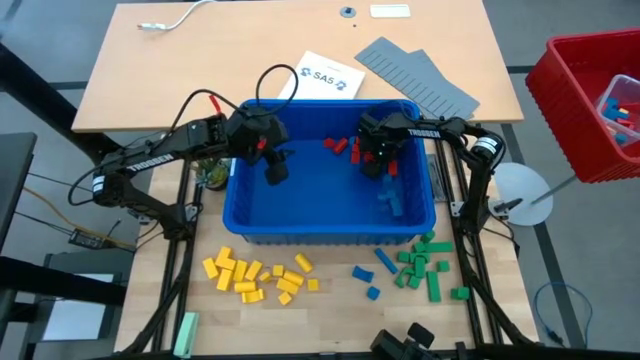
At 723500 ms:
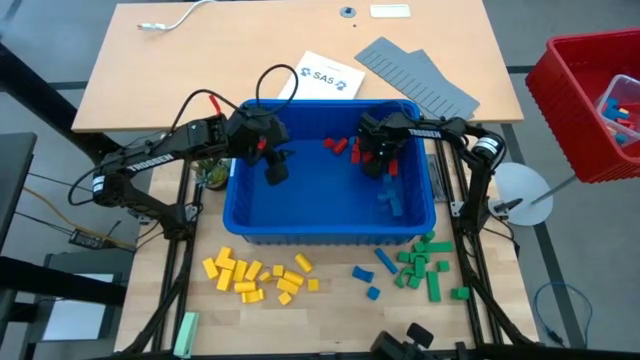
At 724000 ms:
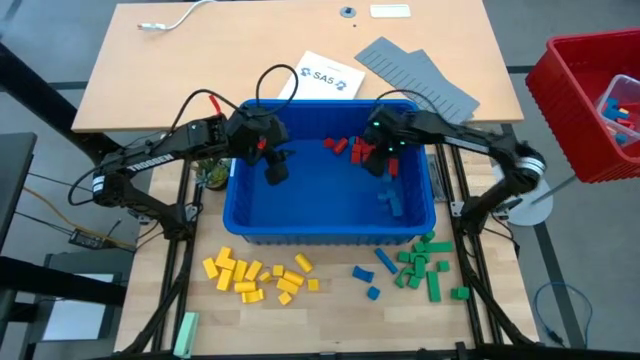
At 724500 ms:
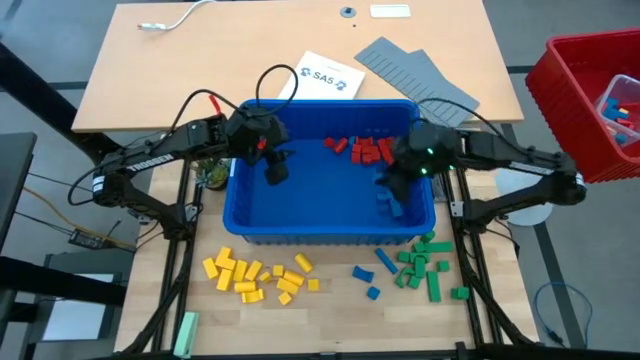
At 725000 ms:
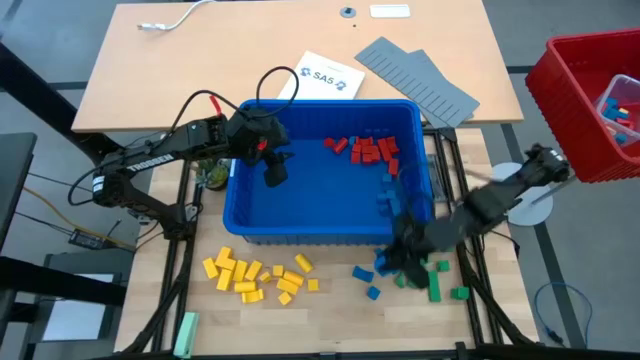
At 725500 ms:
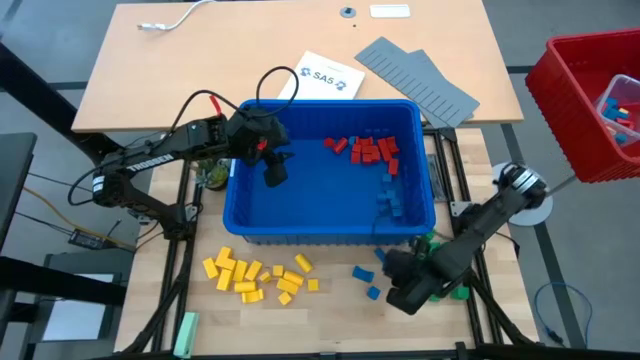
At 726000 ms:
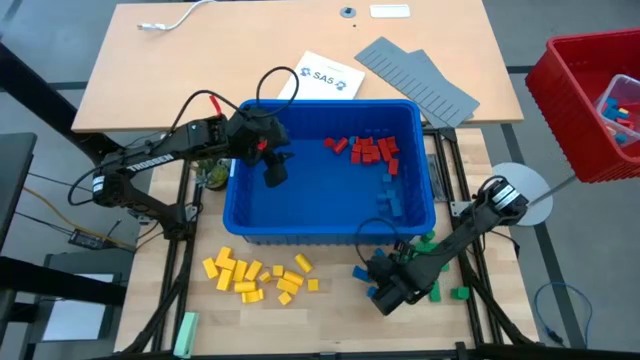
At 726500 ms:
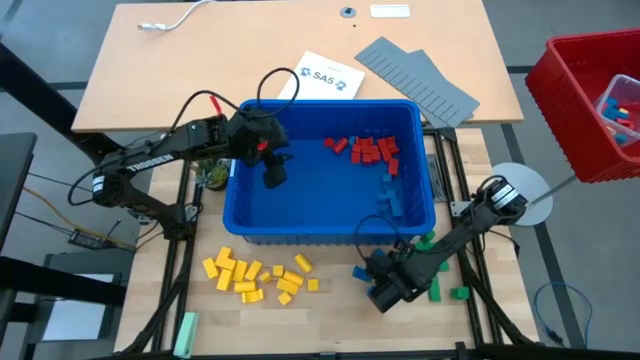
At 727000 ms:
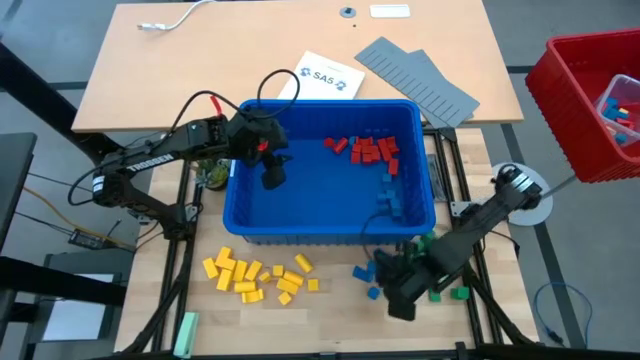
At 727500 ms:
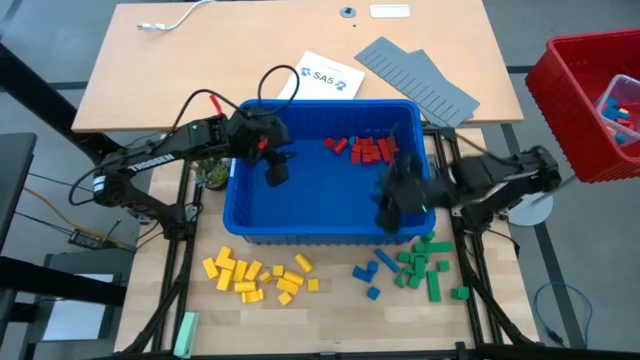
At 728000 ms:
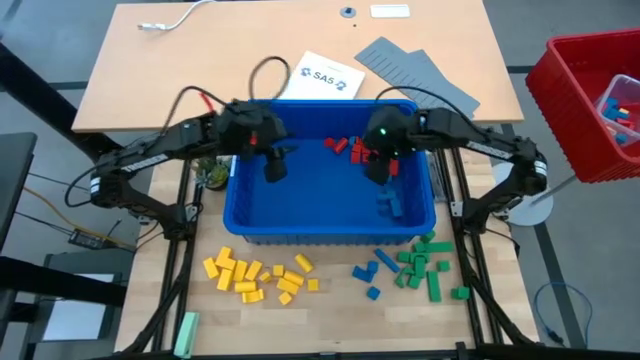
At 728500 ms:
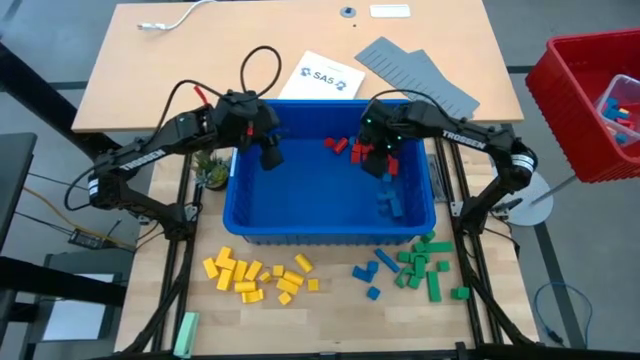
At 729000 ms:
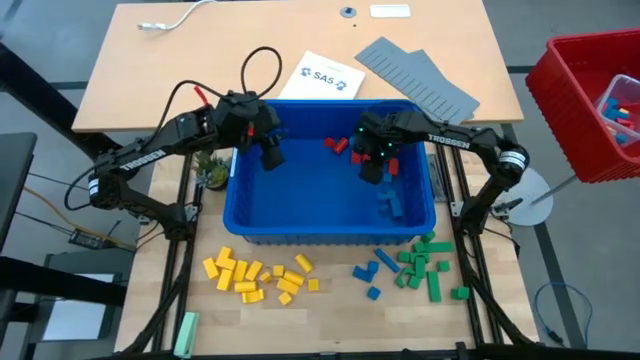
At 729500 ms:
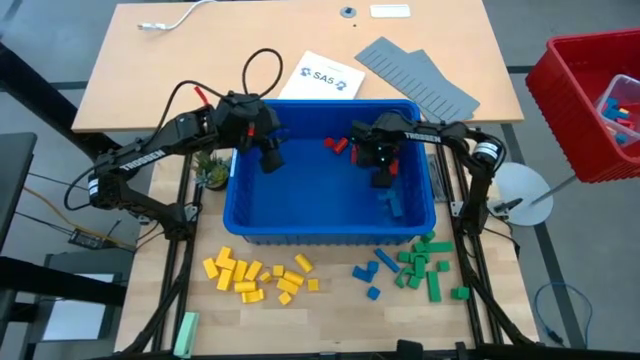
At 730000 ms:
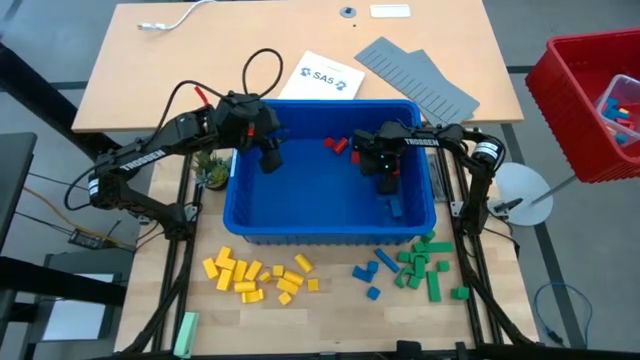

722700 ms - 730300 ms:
Task: Sort blocks
Remove the blue block from the blue bin

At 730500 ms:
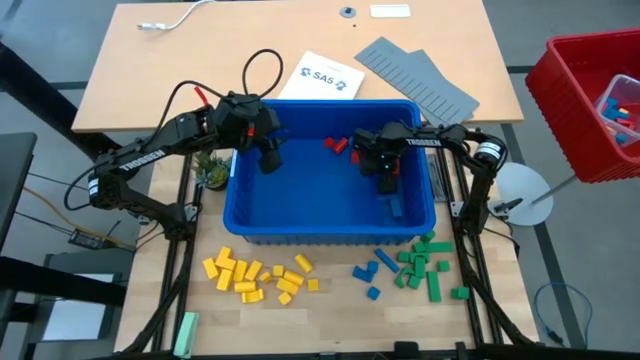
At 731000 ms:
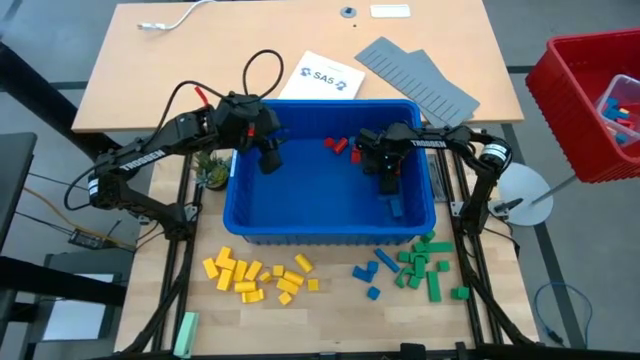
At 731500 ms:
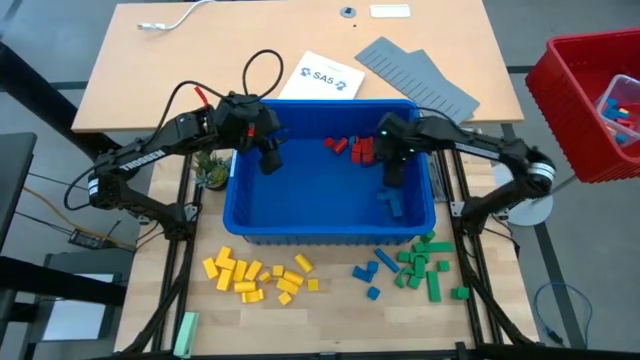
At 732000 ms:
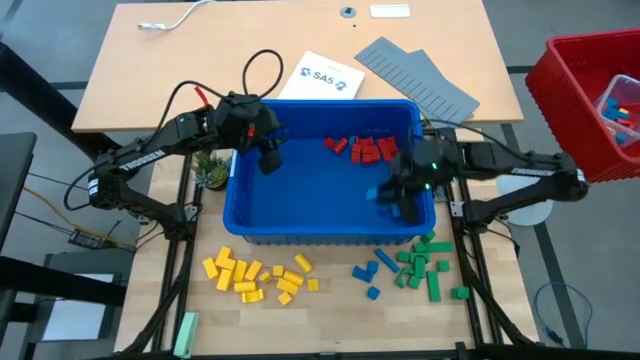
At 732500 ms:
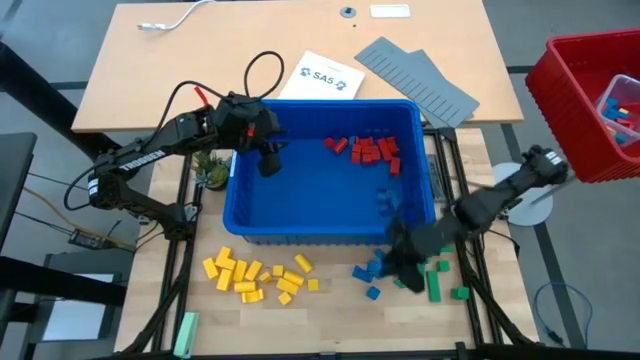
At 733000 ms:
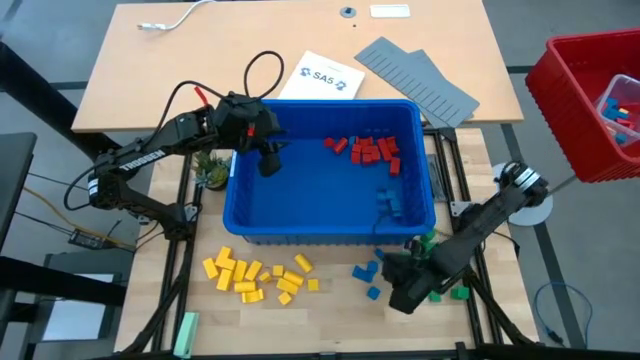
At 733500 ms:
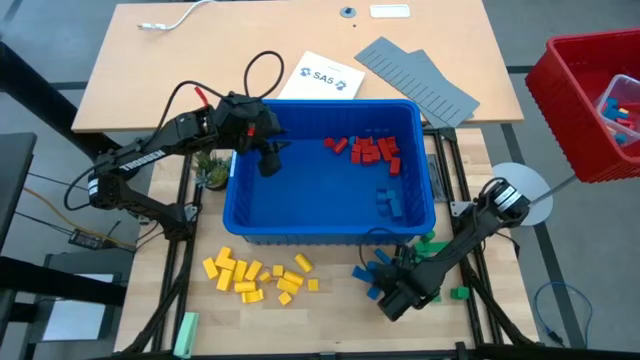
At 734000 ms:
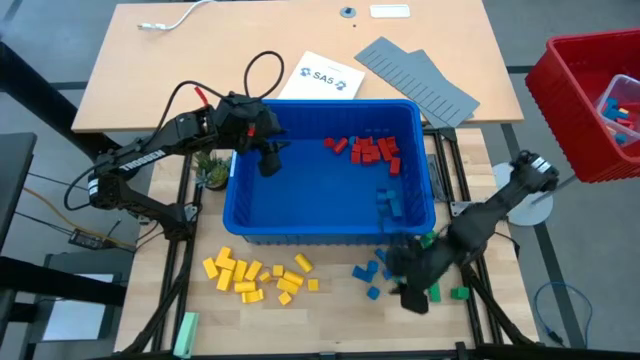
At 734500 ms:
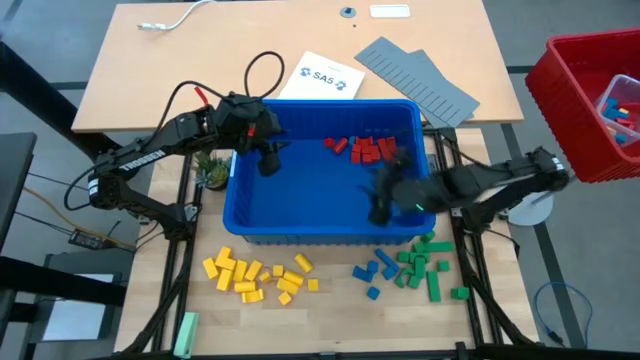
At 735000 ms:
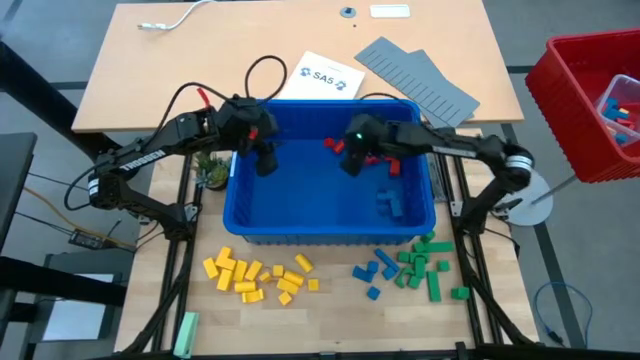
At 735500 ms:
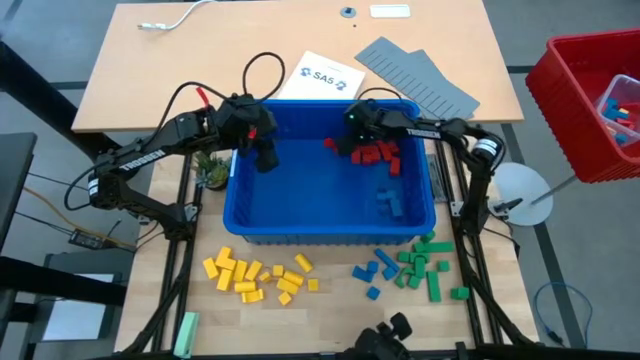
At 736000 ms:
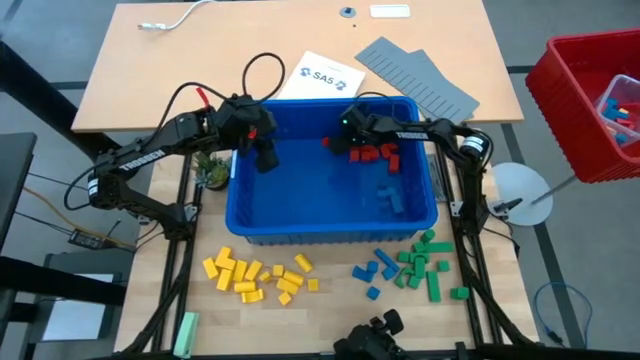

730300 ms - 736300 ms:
Remove the blue block from the blue bin

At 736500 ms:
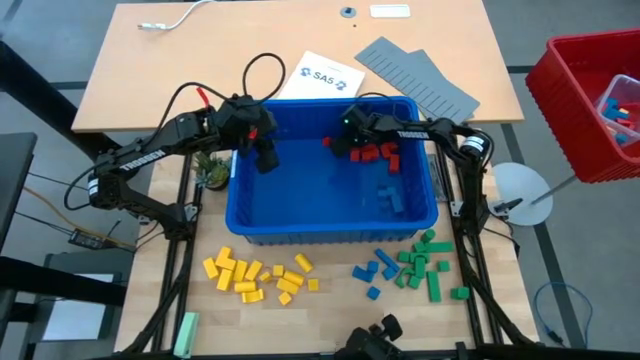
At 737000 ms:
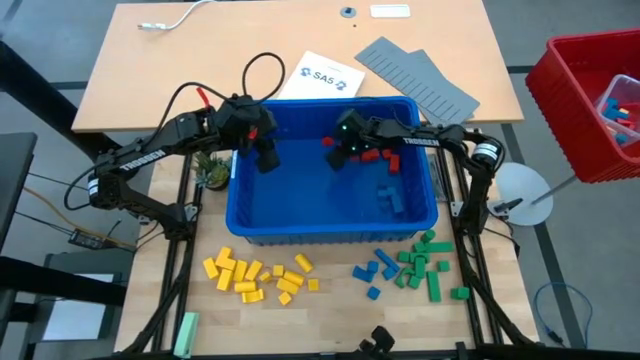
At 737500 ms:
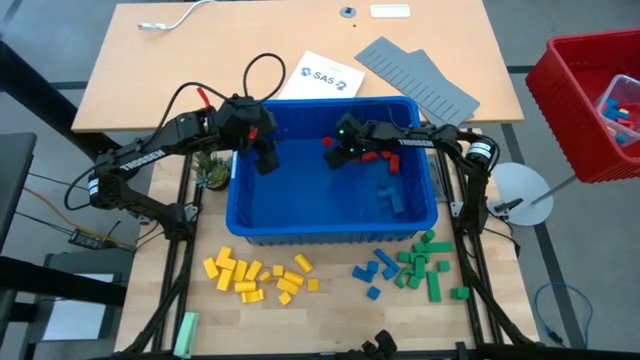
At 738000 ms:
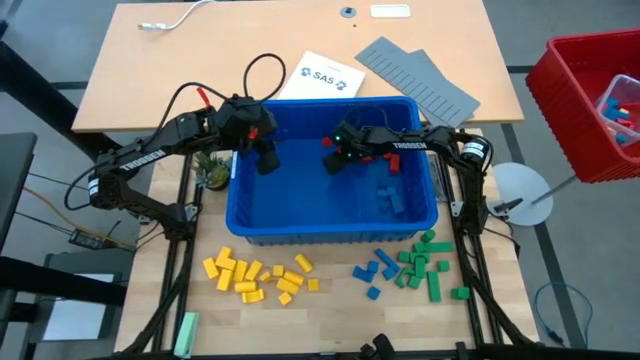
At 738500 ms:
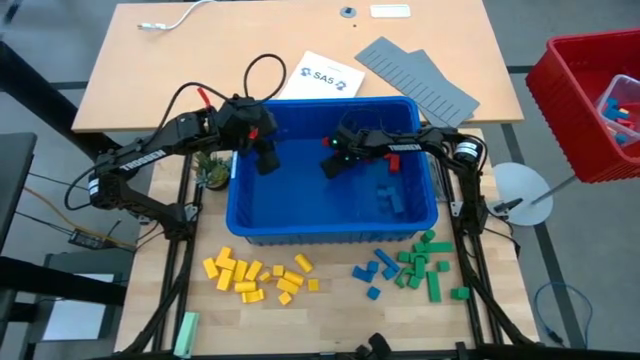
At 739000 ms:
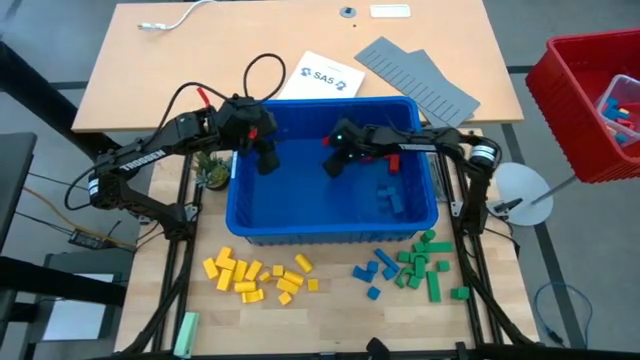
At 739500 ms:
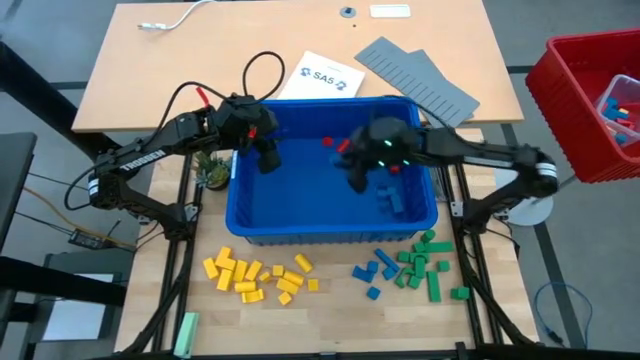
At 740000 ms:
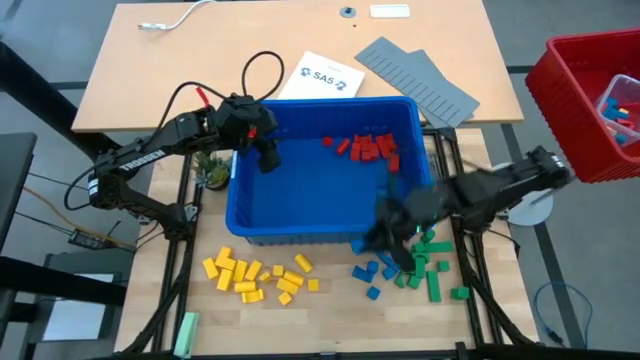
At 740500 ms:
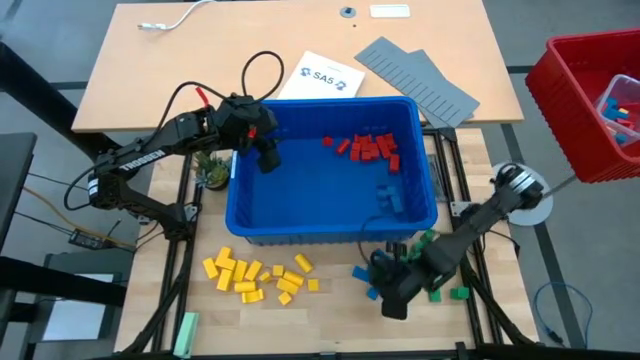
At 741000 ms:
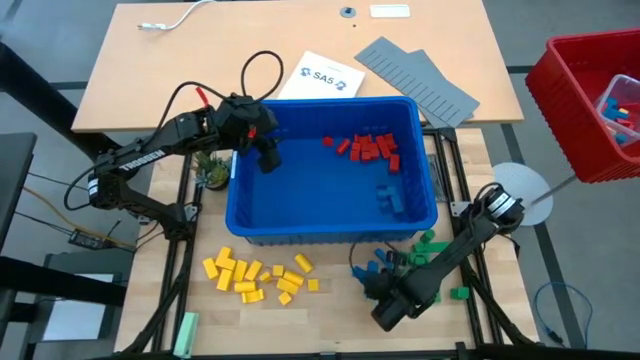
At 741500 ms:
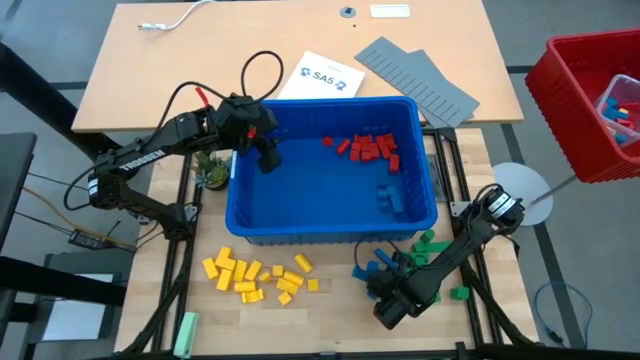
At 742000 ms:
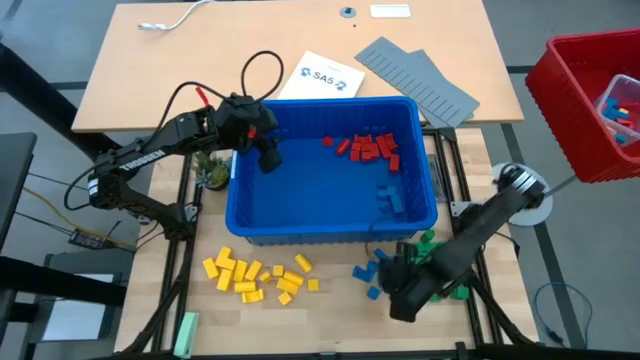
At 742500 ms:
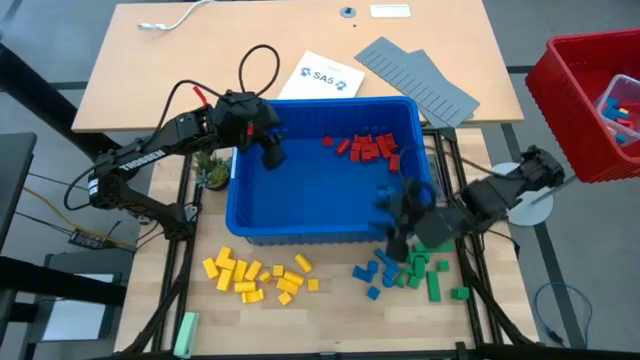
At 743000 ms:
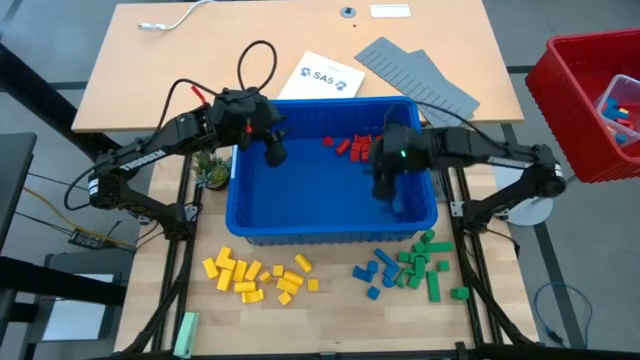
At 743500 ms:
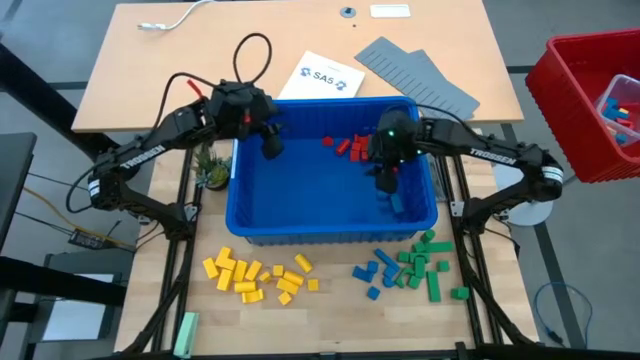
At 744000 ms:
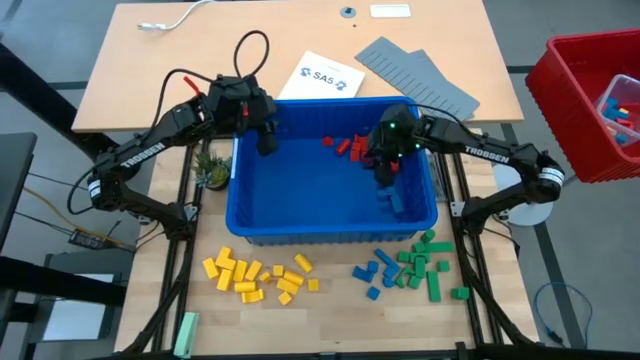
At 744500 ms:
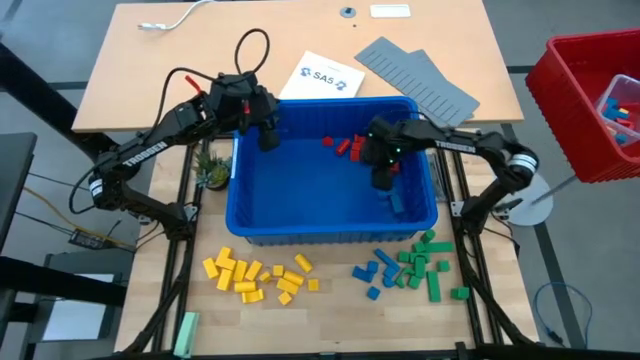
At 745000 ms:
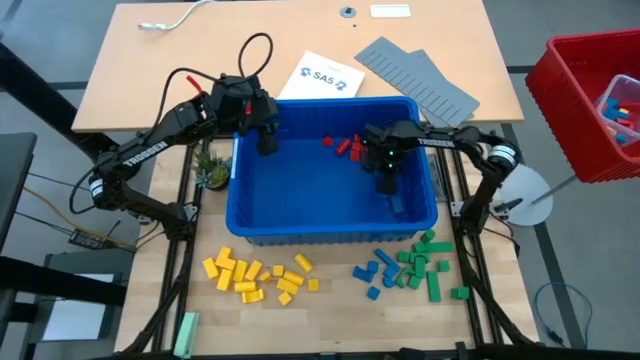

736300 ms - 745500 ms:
Remove the blue block from the blue bin
